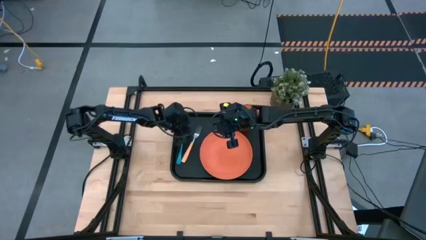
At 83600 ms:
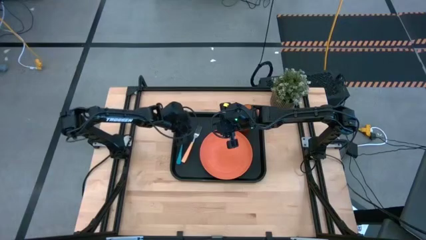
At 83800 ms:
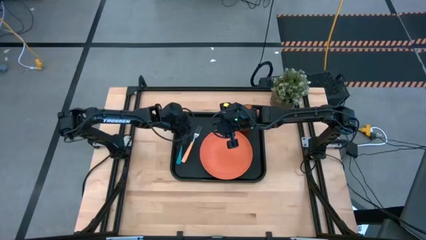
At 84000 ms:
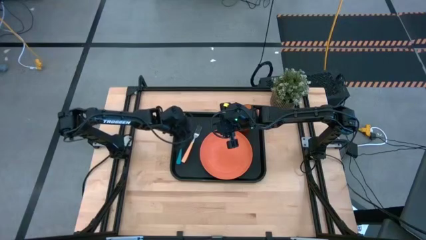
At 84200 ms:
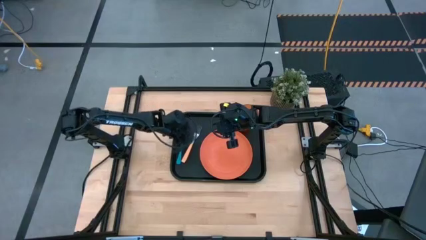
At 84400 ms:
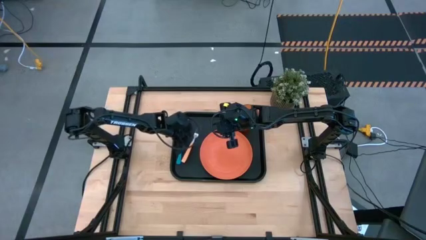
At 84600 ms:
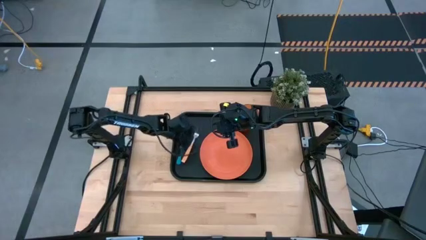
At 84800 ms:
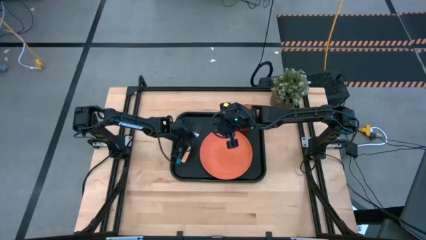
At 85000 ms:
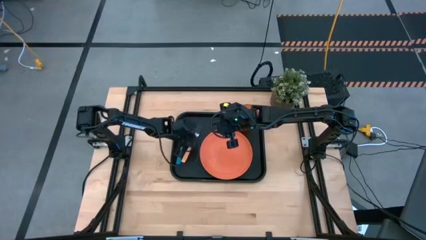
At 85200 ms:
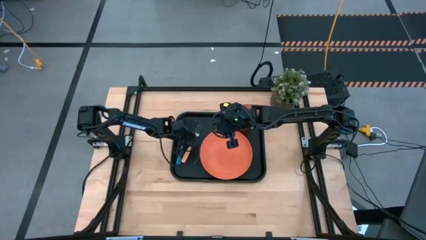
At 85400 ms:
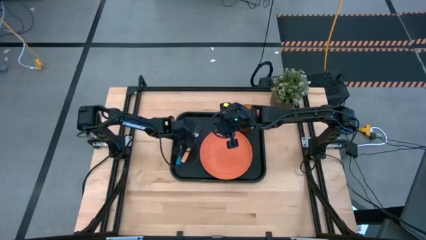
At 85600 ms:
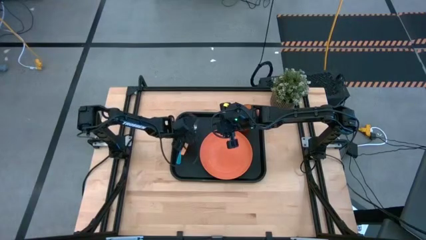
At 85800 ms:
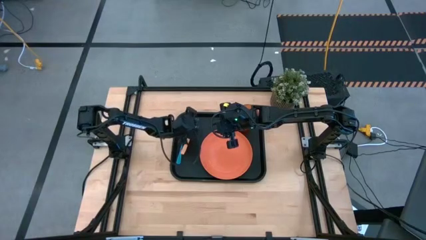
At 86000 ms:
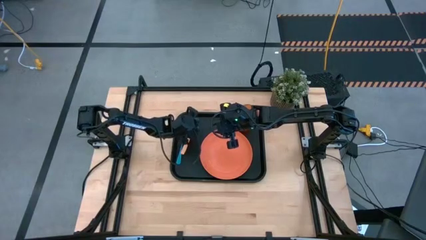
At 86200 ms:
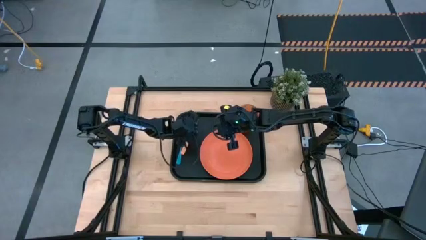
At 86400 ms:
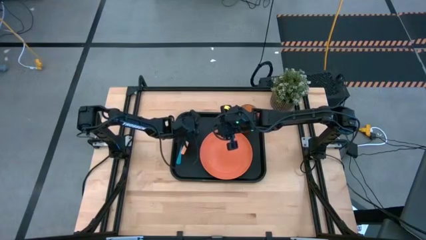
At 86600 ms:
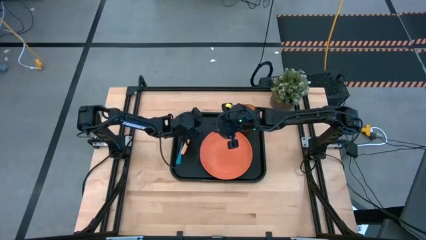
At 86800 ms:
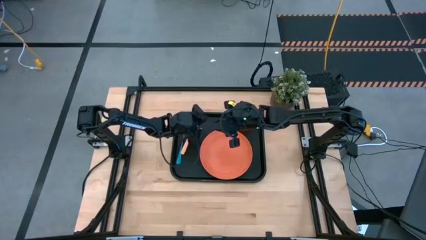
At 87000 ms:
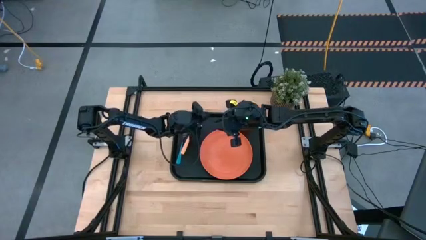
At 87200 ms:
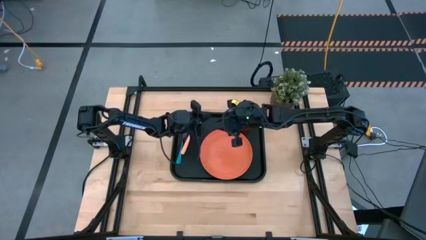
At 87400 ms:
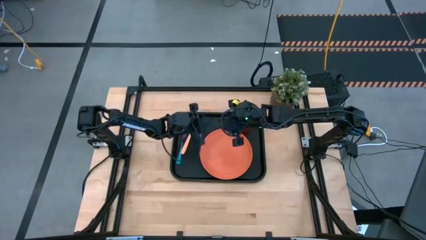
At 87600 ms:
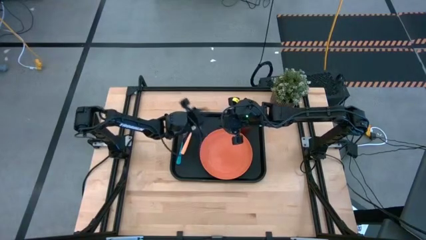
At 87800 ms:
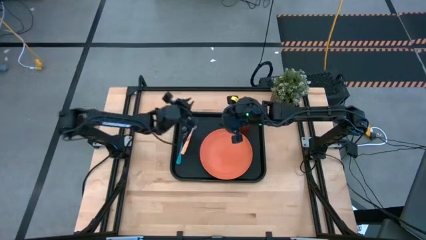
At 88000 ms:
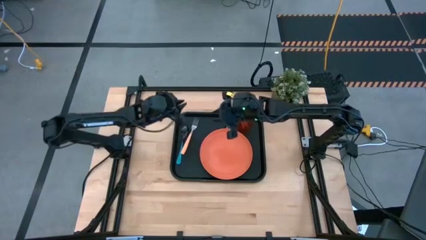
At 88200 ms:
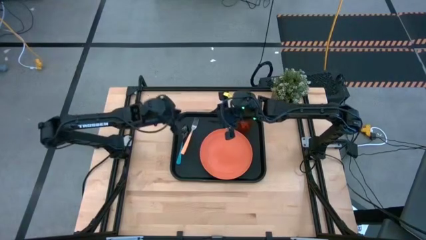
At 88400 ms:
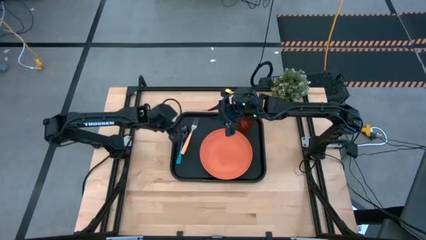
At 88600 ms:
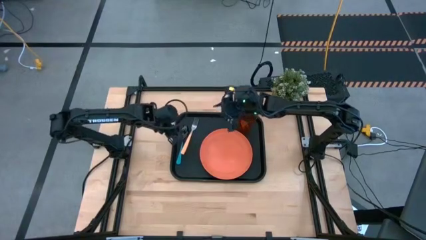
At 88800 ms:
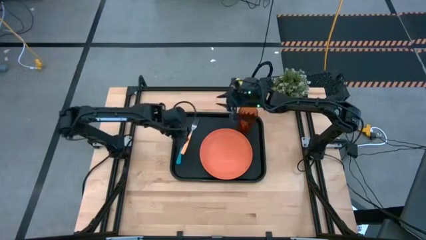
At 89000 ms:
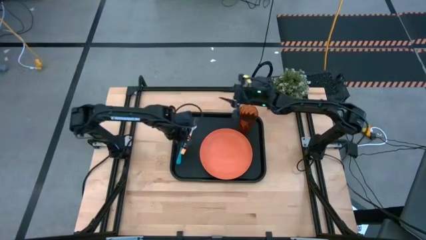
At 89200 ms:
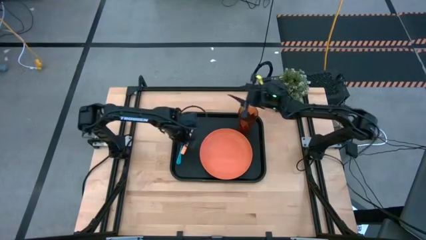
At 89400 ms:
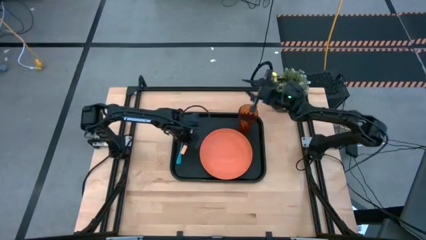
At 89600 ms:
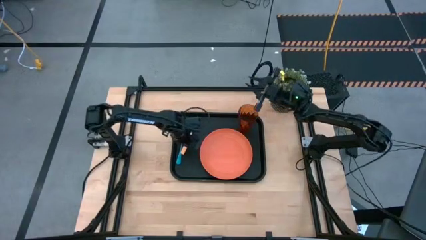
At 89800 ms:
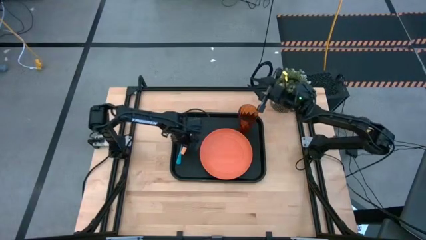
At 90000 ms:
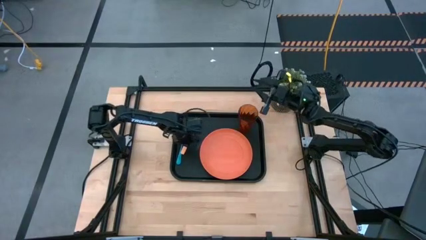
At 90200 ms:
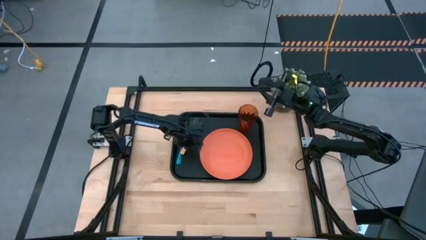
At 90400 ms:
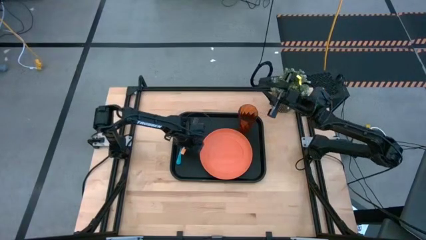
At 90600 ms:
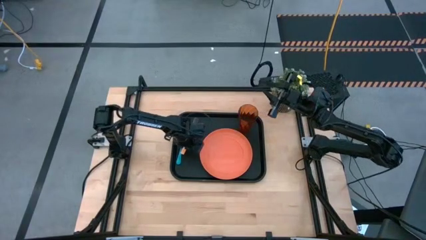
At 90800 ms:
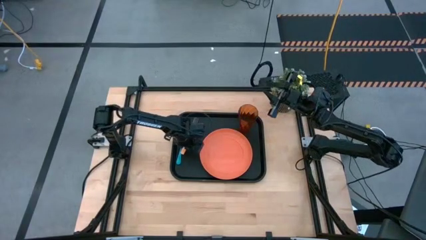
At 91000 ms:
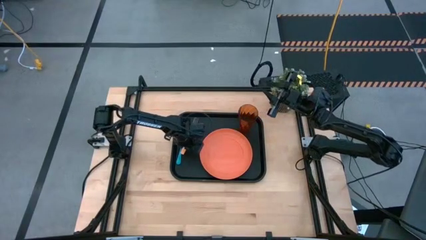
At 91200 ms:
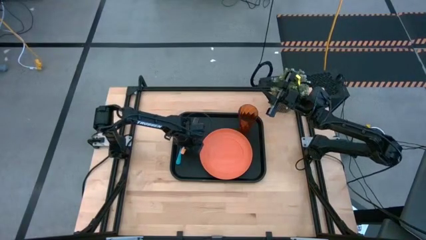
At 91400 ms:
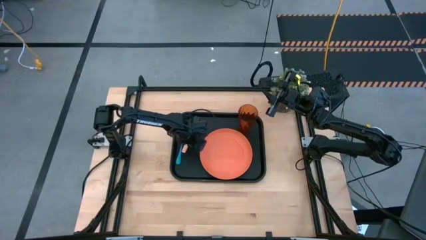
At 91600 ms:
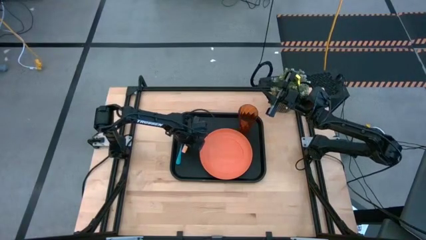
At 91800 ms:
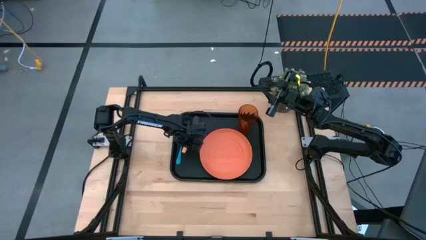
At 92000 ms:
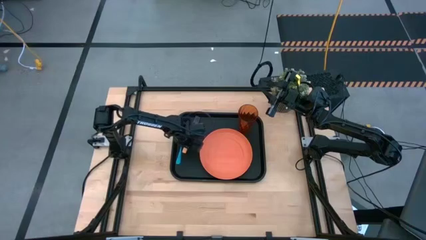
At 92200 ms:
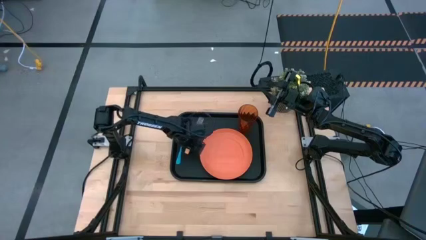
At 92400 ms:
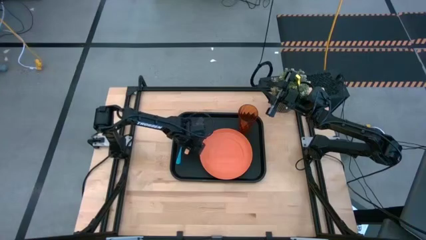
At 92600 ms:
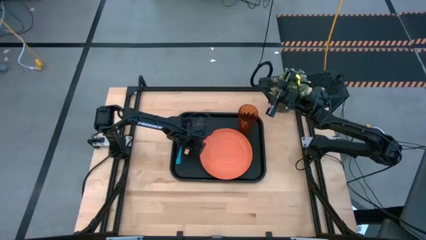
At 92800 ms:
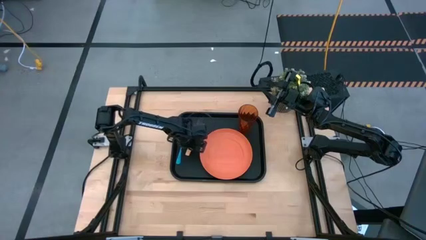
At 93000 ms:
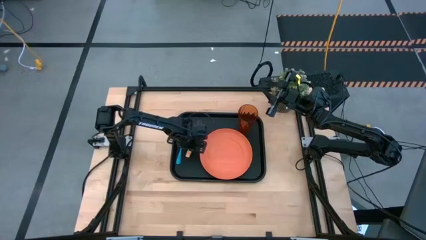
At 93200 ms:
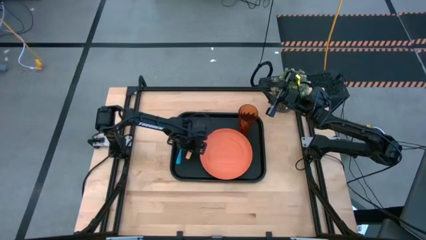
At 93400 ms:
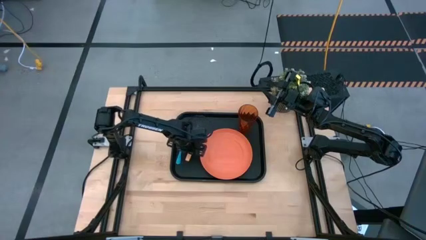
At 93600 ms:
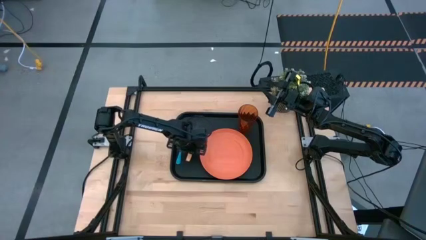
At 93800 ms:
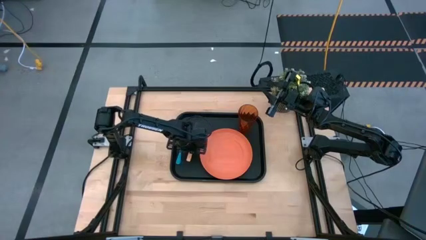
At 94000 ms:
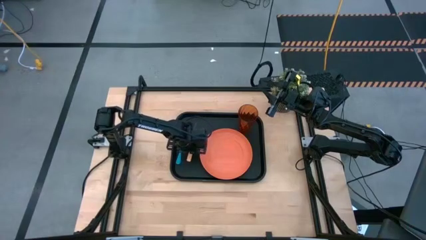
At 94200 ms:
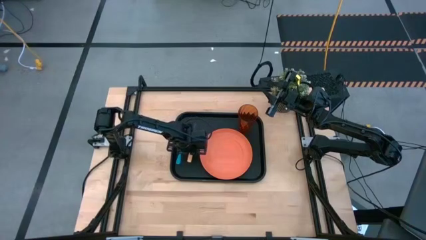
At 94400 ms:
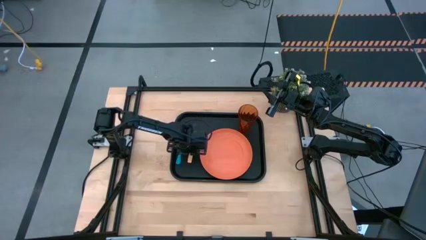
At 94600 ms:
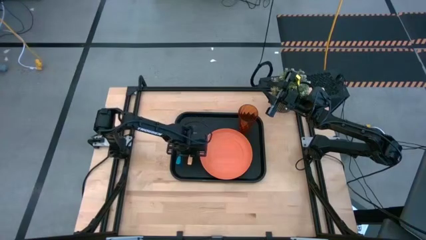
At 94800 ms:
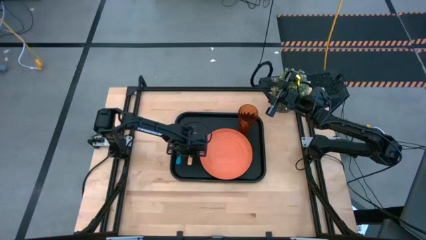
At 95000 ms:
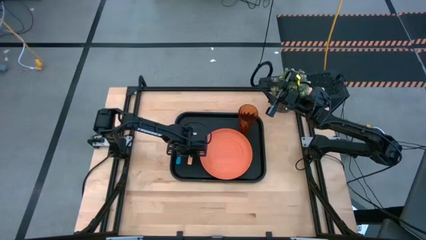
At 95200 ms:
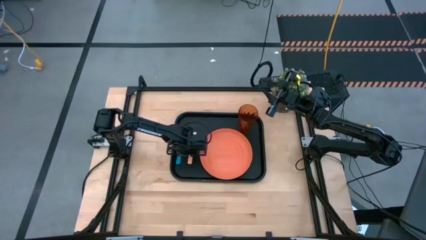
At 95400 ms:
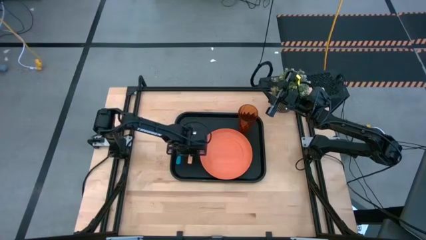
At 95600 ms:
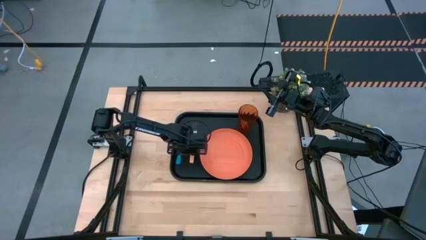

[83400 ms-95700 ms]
Task: Pick and place plate/cup/fork/spoon on tray
Adjust the orange fork on the black serving tray
